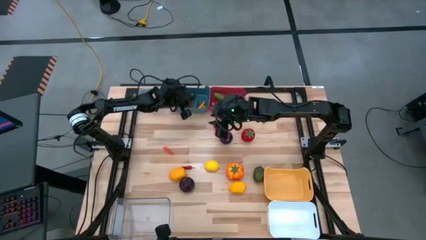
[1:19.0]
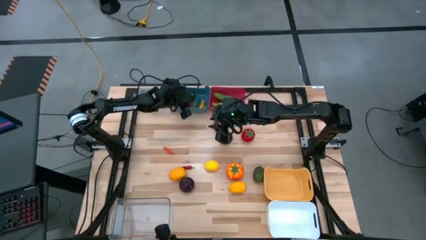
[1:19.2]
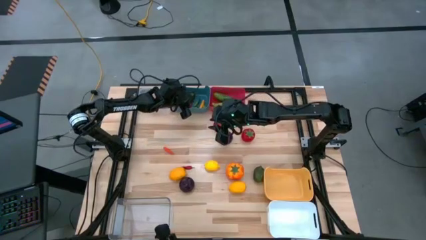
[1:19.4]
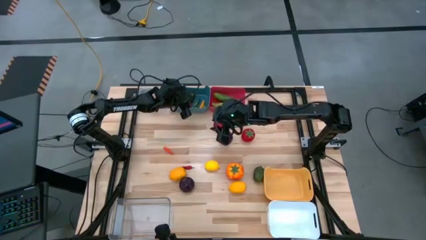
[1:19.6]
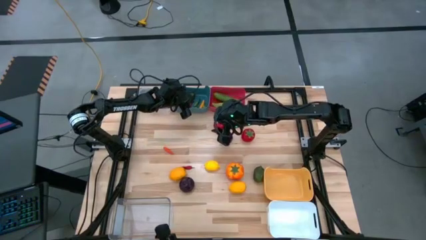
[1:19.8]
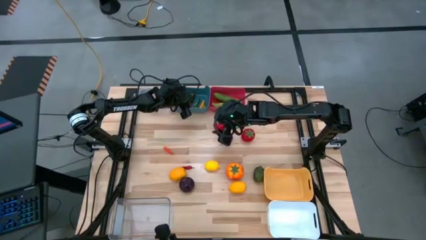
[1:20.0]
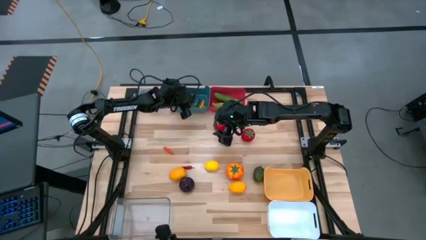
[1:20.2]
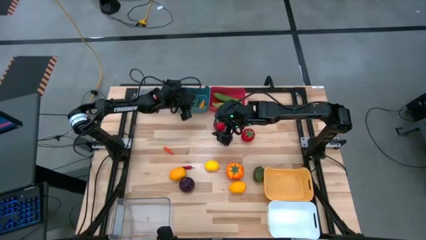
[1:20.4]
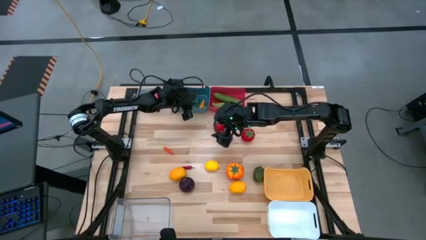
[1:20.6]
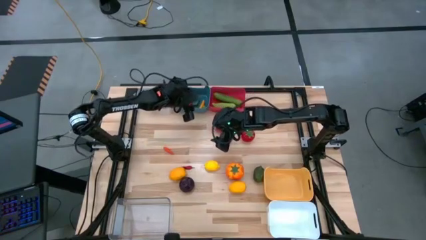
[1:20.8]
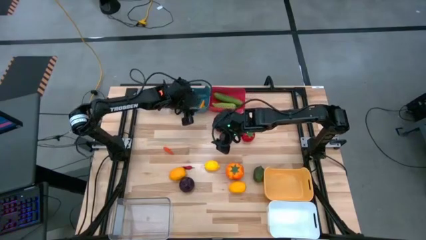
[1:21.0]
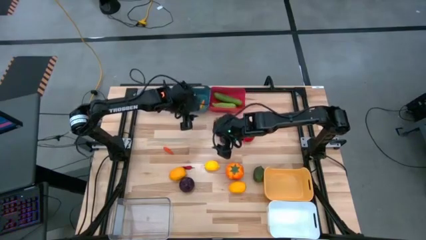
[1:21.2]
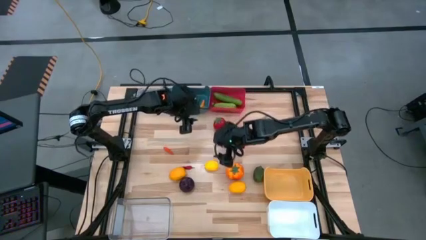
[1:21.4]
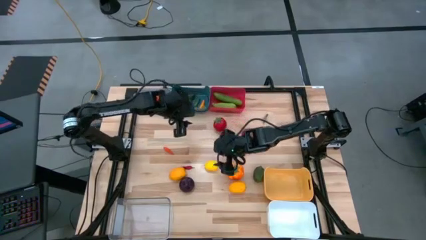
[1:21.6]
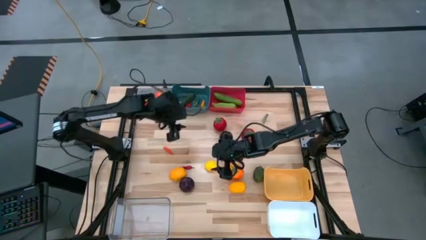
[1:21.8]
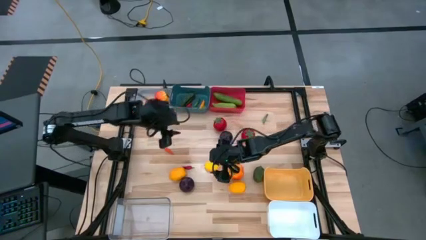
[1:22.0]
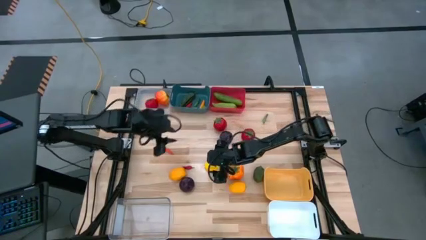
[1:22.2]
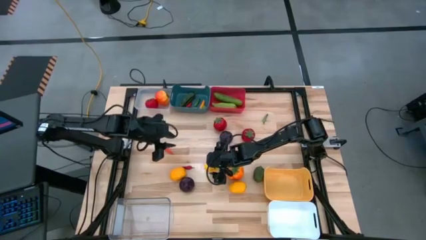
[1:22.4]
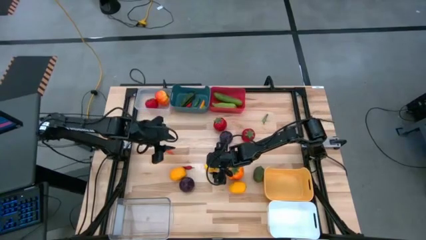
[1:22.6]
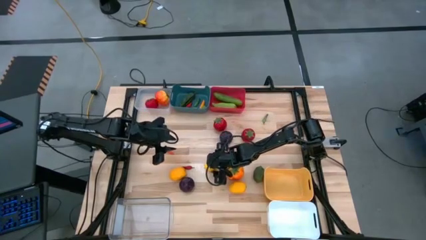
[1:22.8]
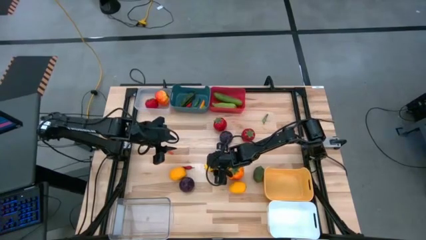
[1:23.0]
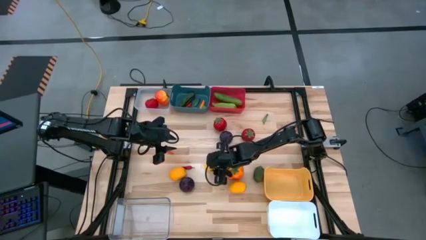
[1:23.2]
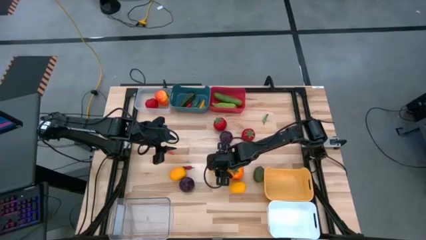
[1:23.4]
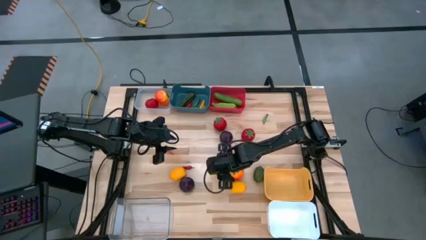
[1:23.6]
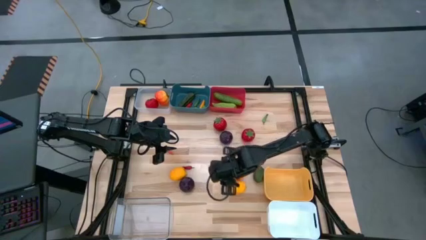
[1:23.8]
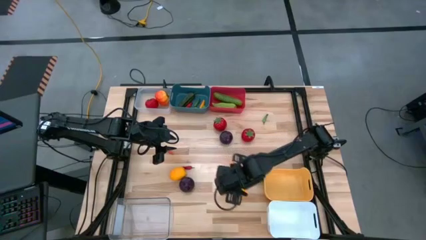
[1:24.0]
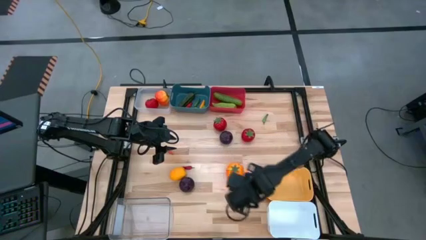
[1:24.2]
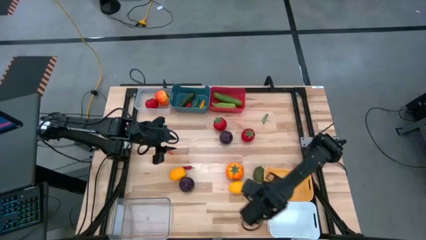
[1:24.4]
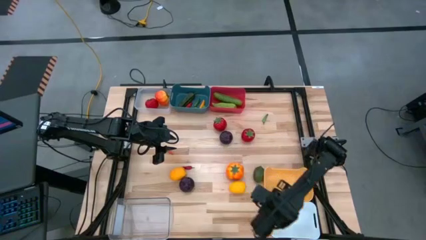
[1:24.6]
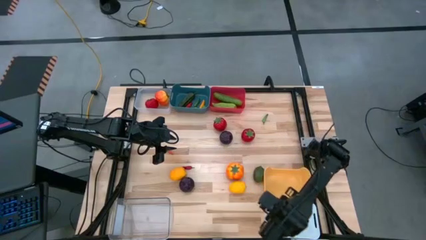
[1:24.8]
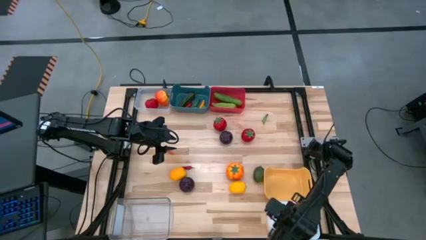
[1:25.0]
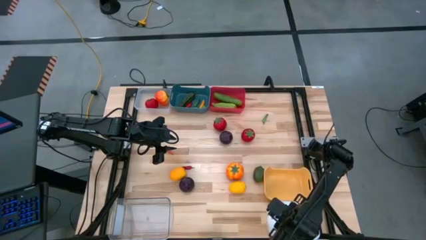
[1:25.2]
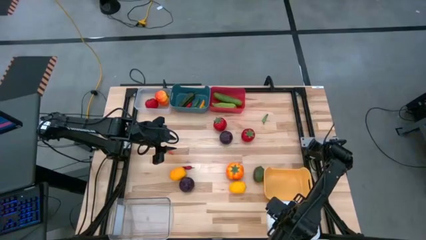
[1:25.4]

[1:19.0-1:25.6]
Task: Sort produce into baskets
Put the lemon into the white bin

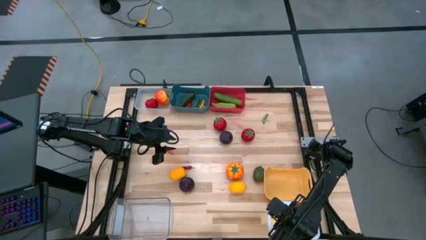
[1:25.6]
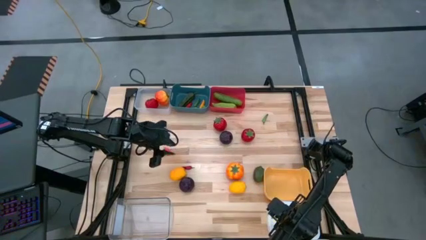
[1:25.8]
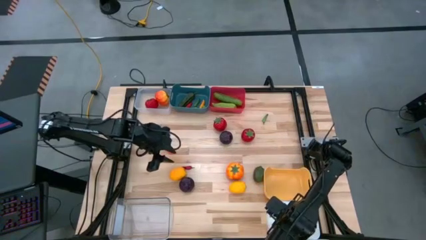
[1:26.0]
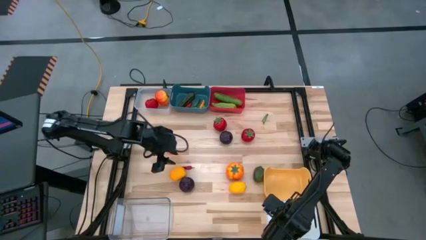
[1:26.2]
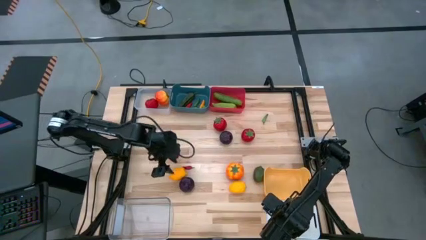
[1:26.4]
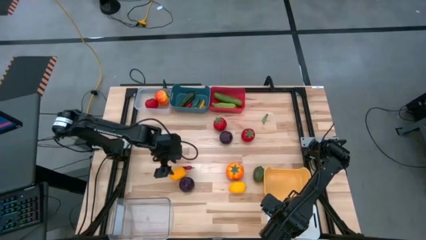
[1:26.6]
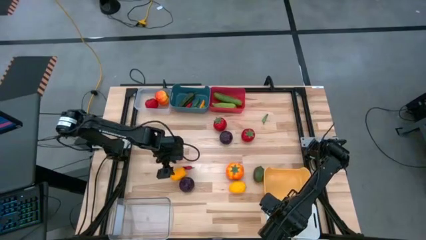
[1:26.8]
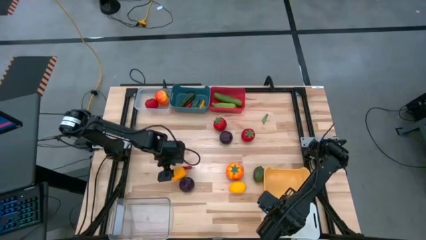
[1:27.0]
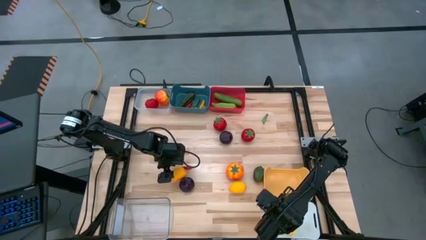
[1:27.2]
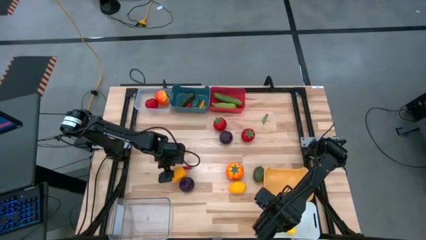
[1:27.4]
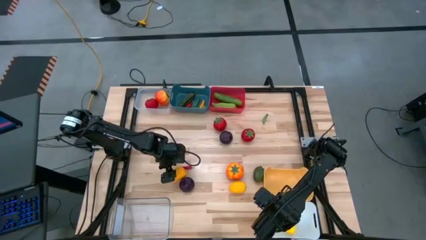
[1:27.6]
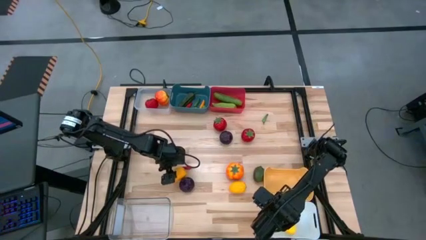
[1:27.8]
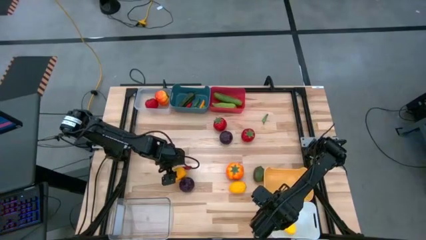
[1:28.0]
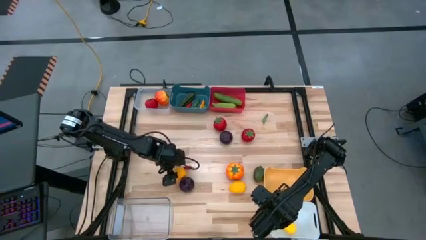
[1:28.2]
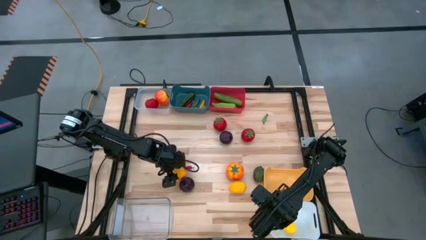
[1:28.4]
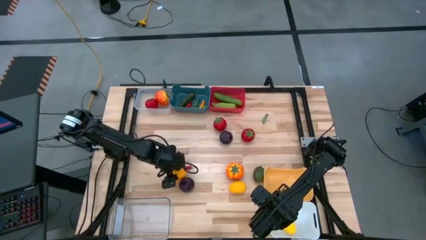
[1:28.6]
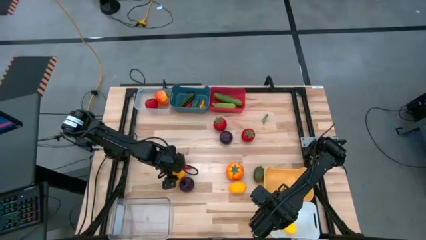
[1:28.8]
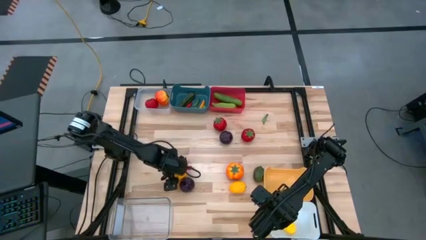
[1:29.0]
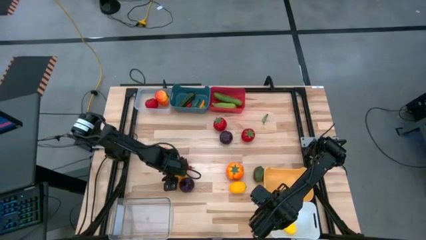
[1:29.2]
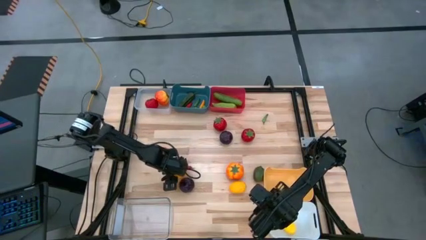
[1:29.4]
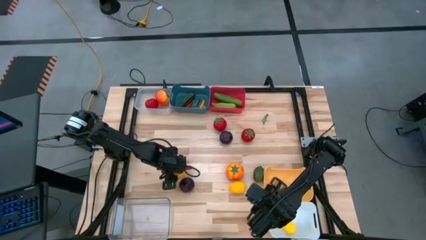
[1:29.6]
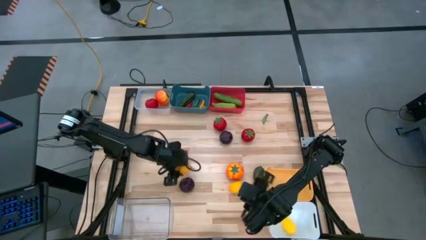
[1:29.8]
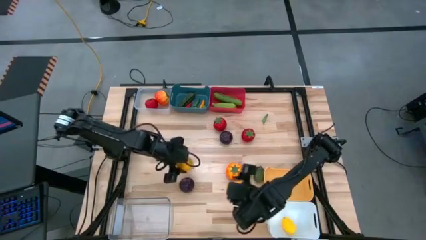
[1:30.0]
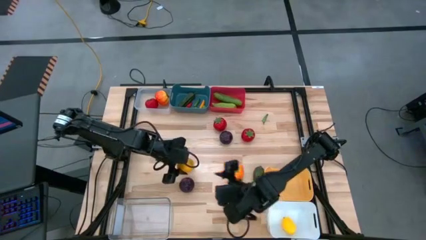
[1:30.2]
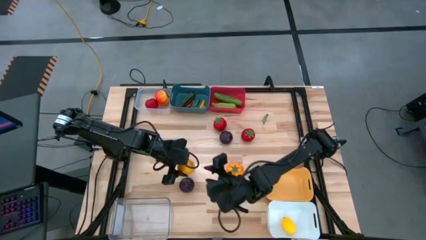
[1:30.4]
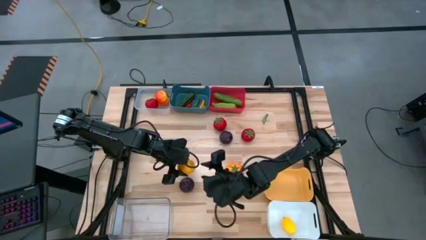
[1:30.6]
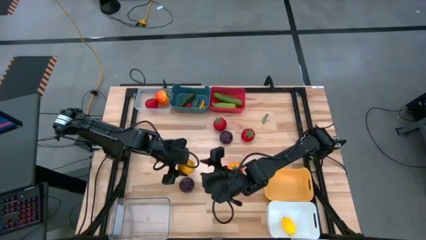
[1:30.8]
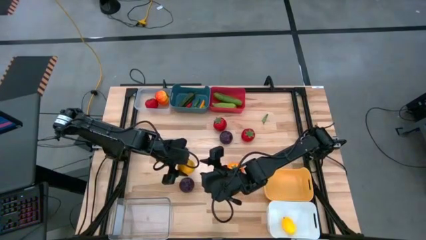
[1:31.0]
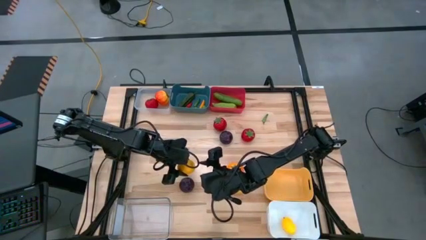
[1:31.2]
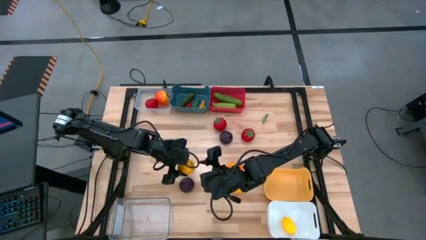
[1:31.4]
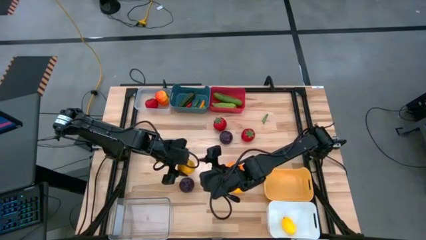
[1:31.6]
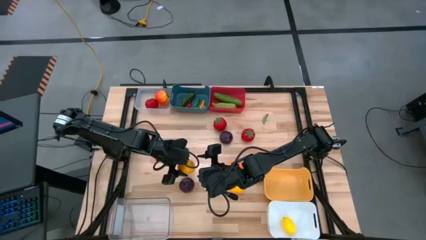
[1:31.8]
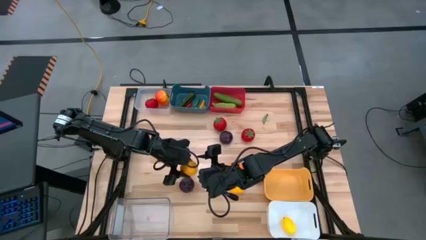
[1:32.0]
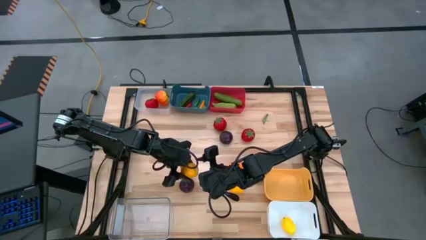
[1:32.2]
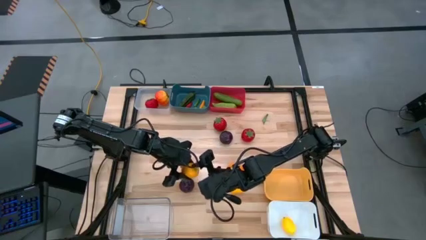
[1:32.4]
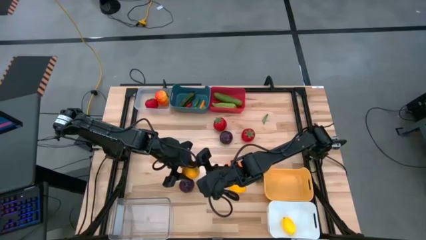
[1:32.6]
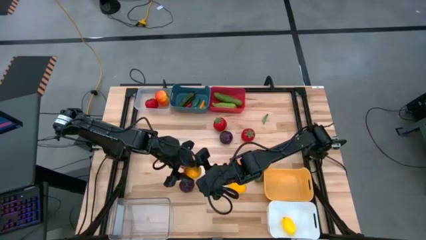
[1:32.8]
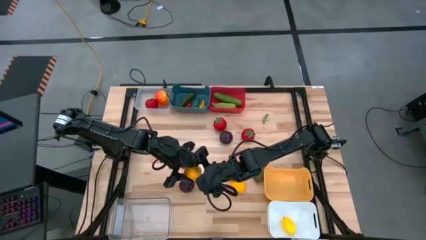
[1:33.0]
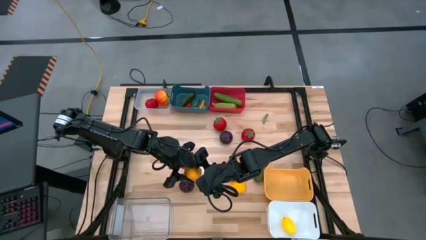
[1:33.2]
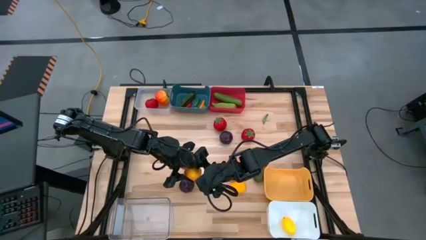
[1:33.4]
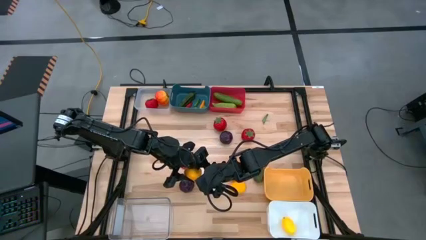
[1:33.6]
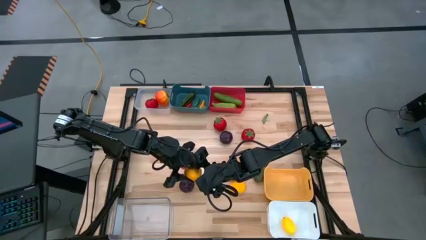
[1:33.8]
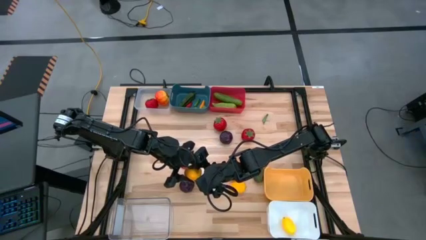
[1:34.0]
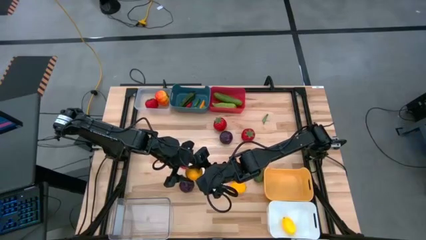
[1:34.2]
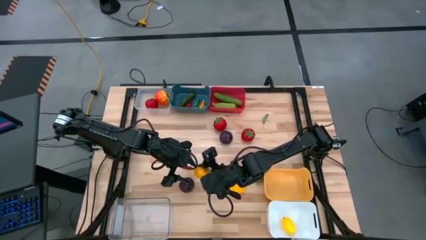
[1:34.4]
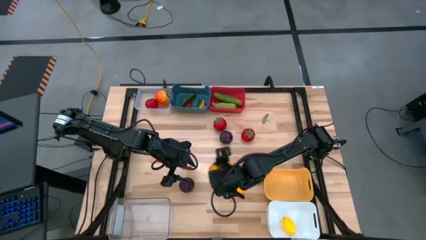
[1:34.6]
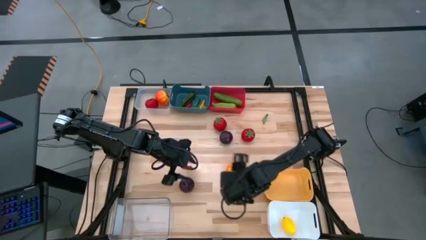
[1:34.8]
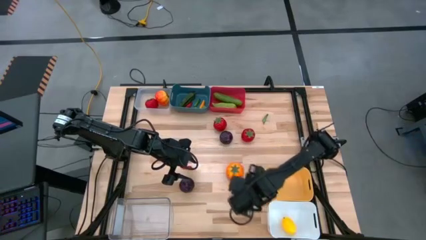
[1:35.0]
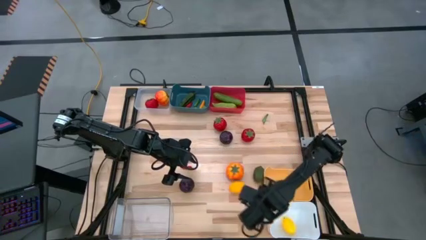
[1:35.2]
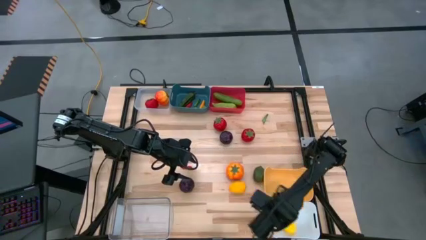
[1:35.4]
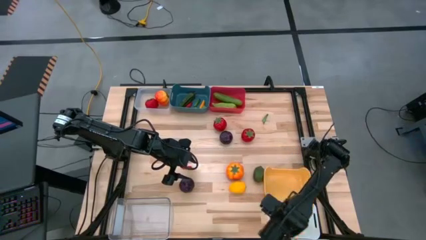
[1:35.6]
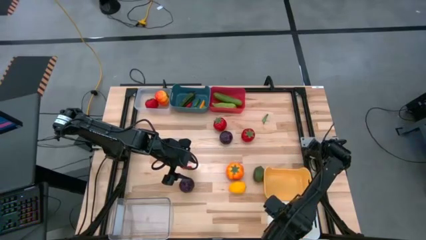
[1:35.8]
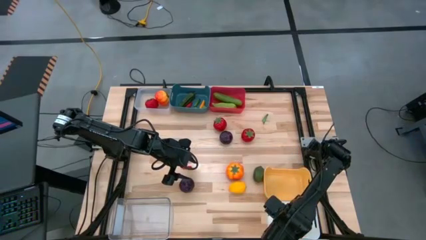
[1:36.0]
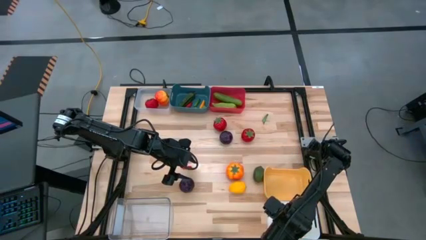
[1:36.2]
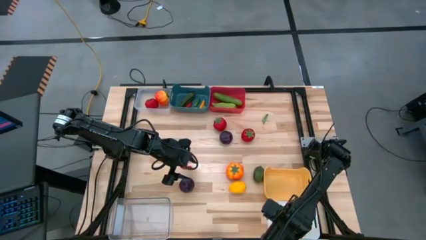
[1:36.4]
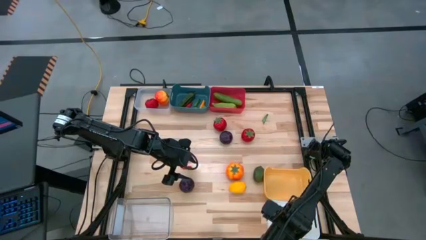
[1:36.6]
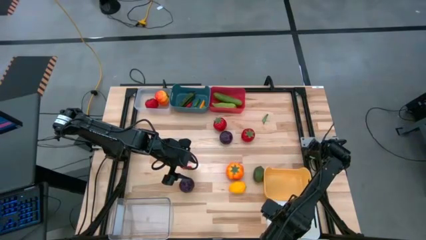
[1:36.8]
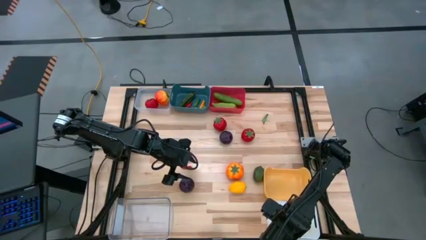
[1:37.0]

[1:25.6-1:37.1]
Put the lemon into the white bin
